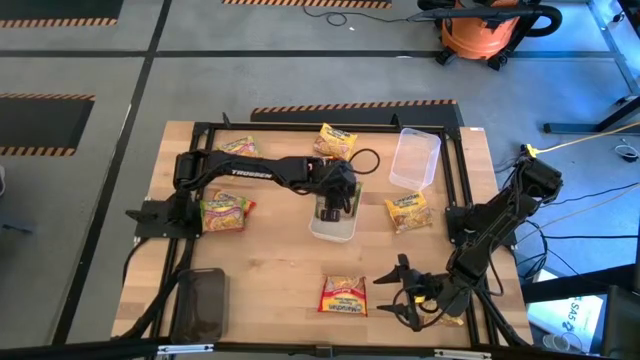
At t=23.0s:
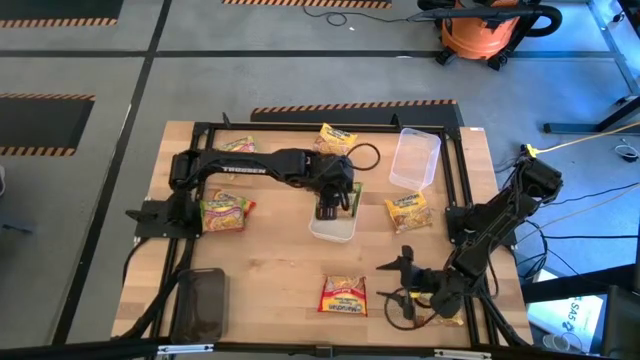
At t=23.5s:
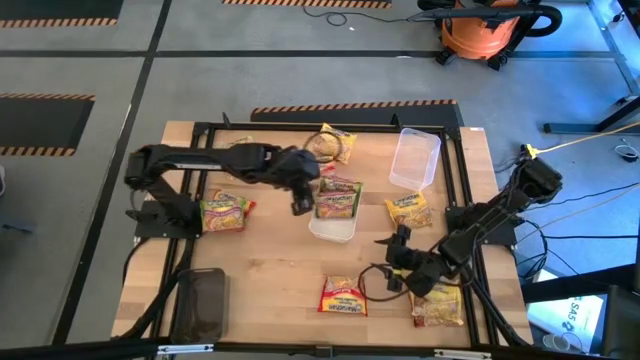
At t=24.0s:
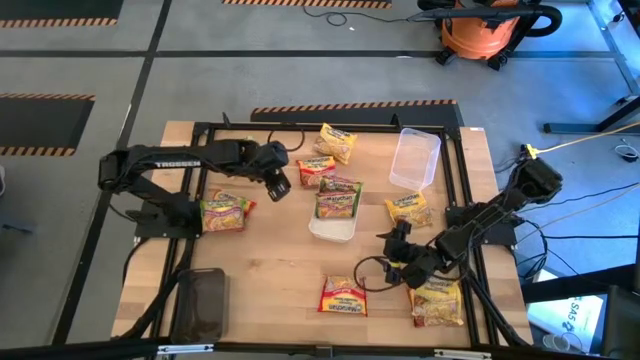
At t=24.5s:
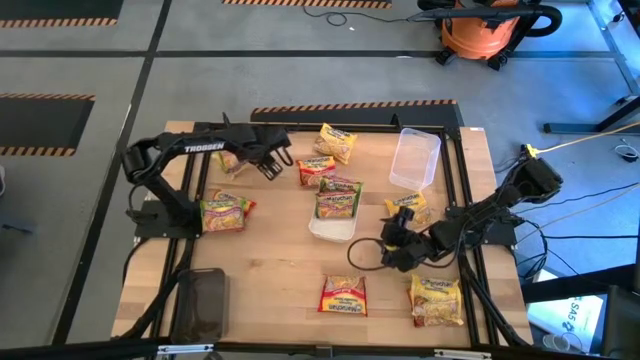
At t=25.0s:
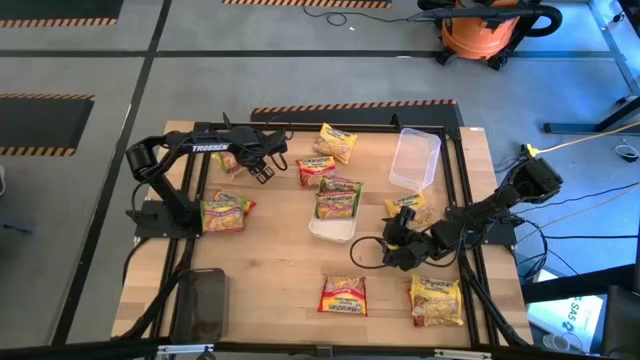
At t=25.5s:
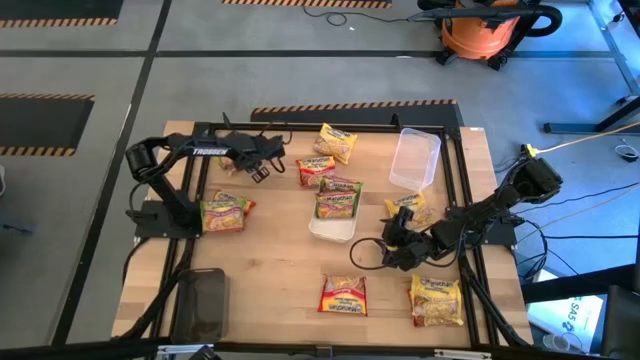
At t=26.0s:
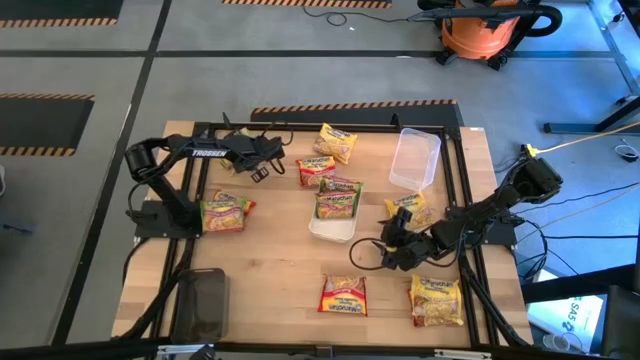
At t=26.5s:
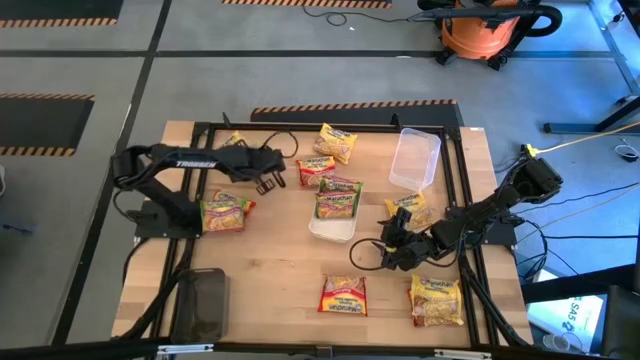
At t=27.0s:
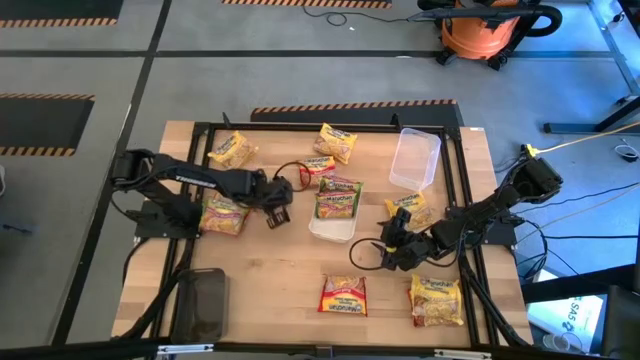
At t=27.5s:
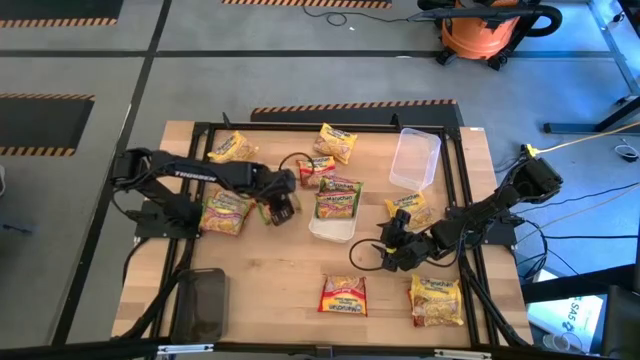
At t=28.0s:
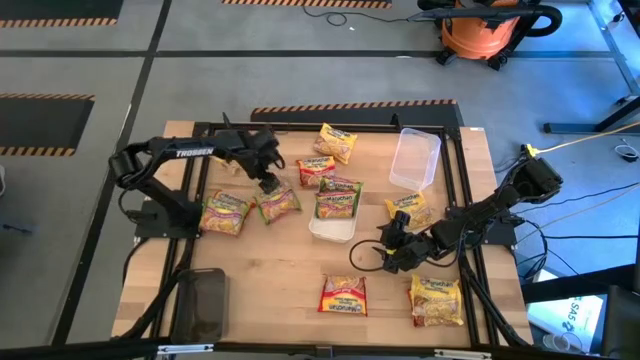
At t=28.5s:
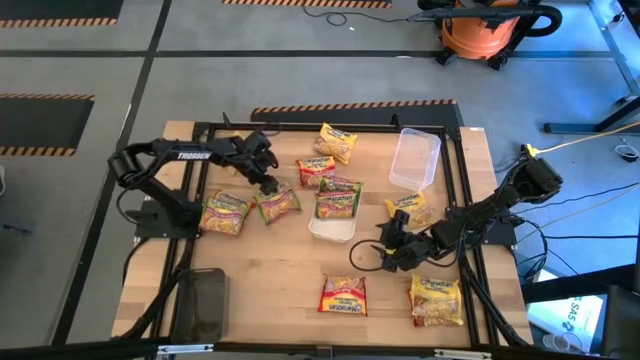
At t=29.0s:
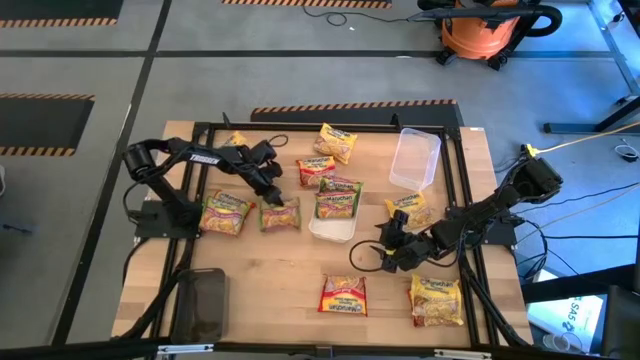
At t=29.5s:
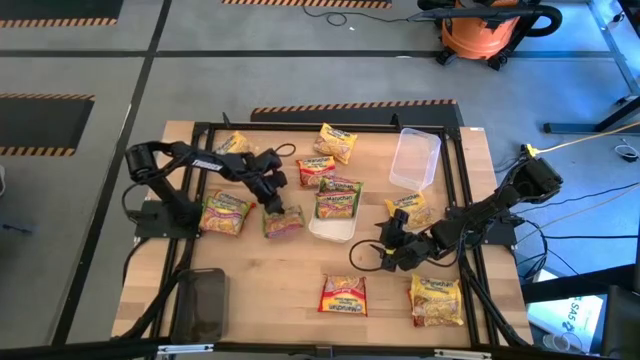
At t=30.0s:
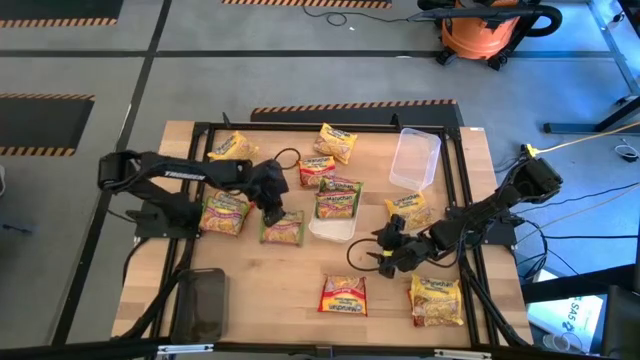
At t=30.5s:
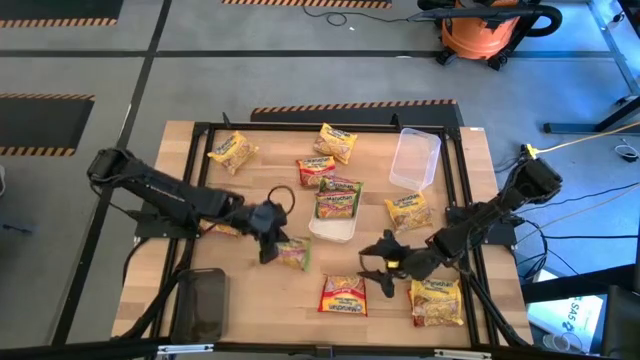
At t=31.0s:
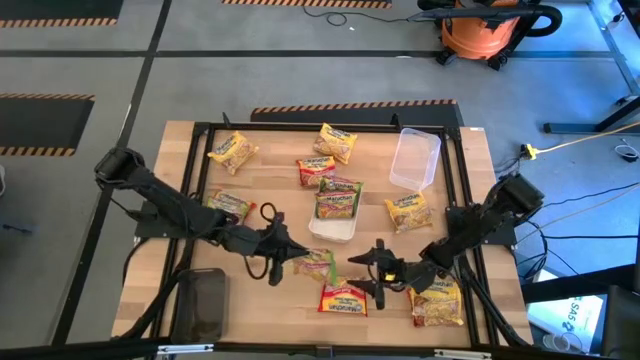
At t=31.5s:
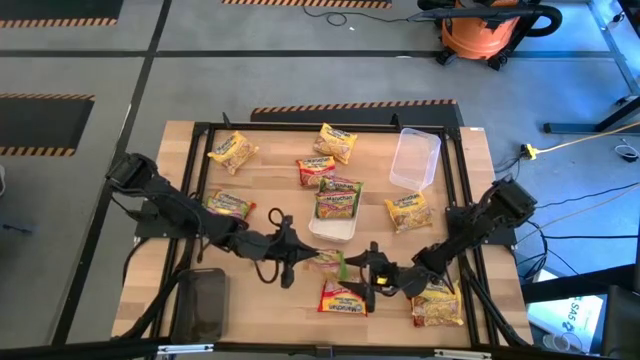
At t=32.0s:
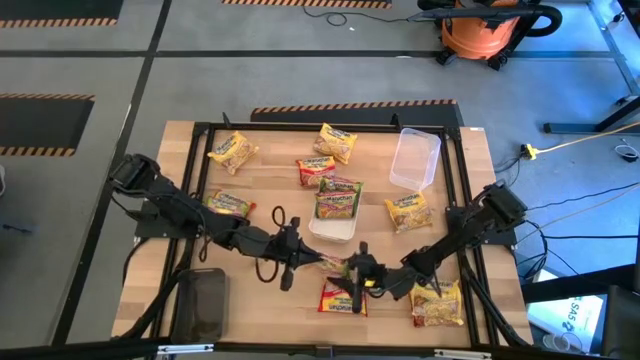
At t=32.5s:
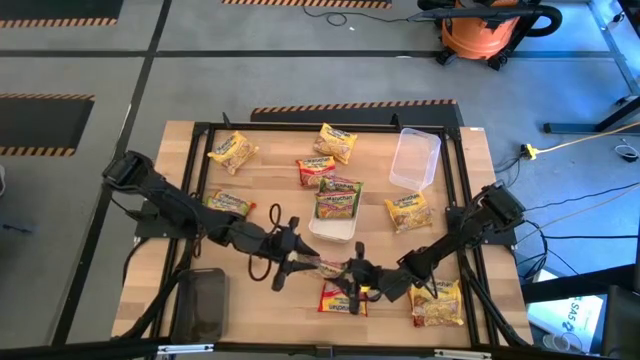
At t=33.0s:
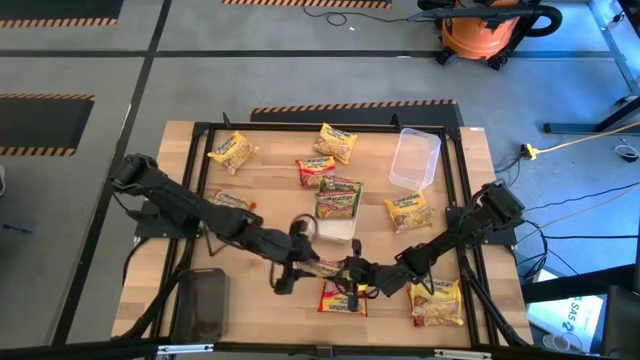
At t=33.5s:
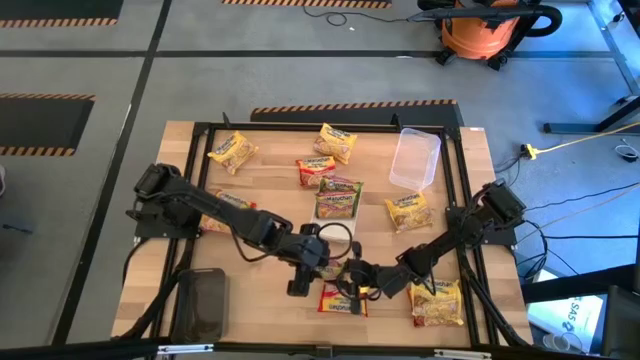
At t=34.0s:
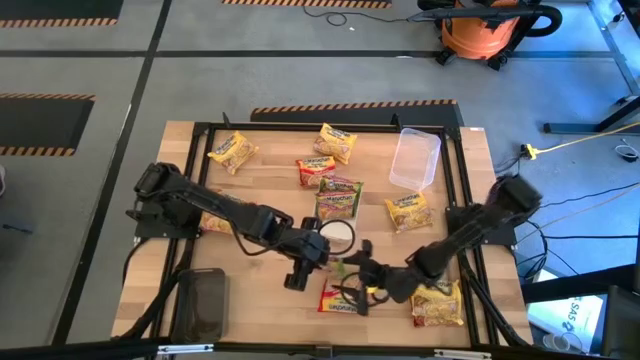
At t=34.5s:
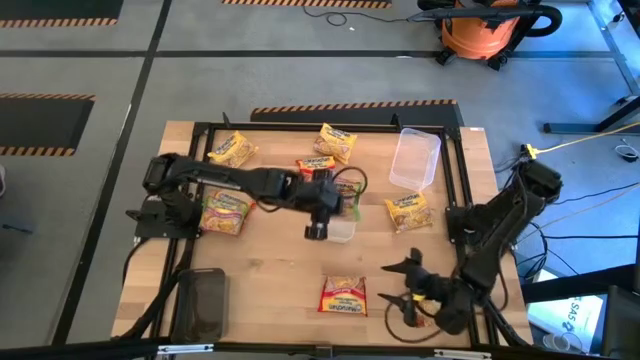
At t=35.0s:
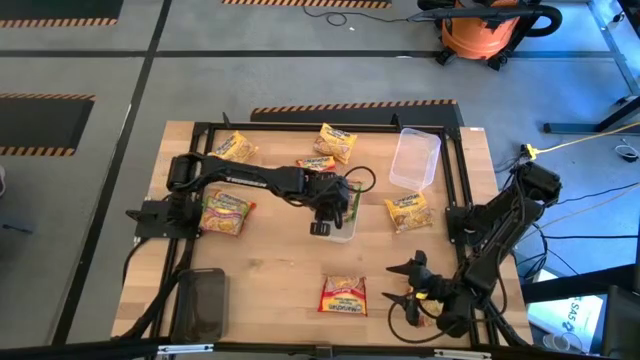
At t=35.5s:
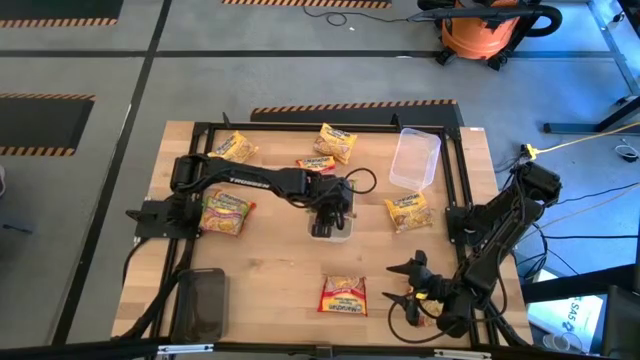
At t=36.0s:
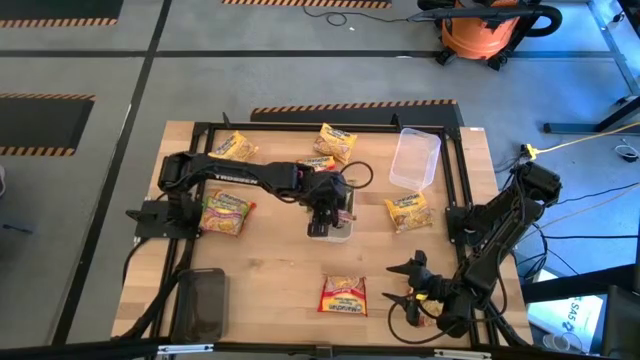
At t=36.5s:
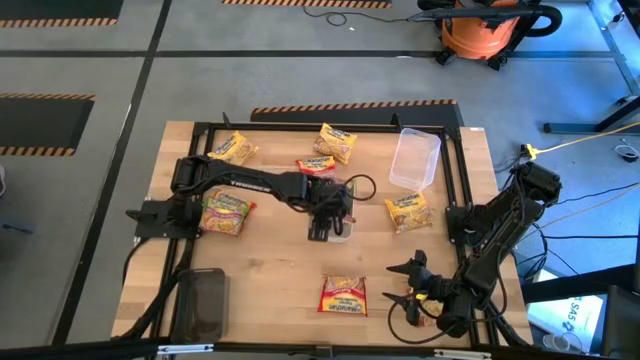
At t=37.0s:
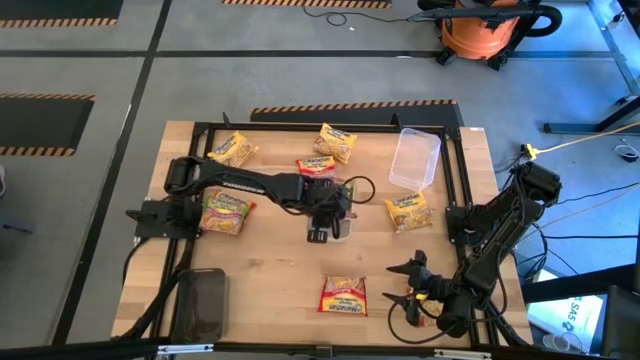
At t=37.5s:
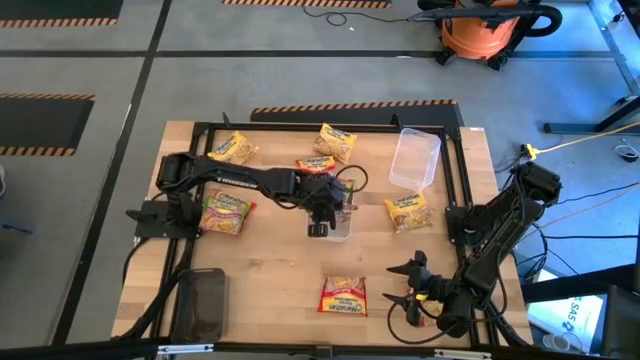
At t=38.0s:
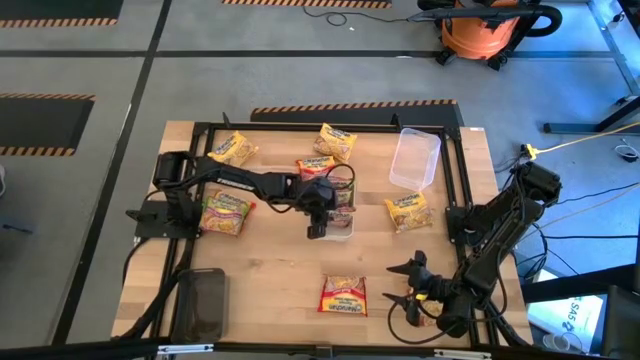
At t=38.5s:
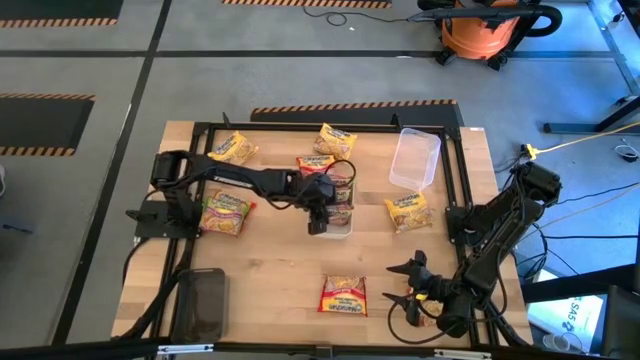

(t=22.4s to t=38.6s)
Task: Sort Maruchan noodles
Put the green noodle pack into the white bin

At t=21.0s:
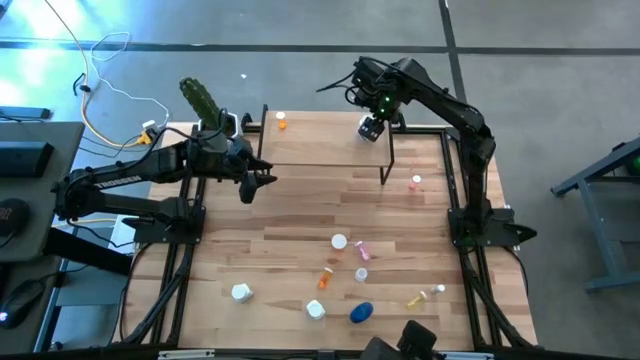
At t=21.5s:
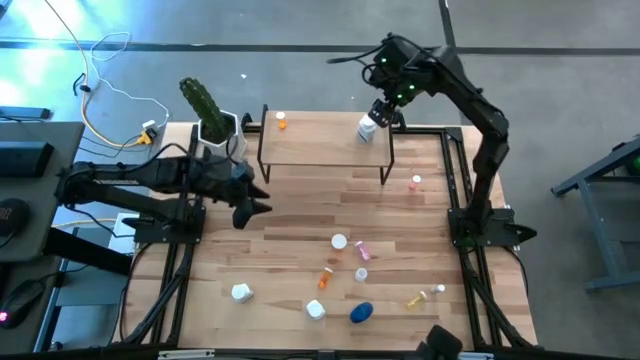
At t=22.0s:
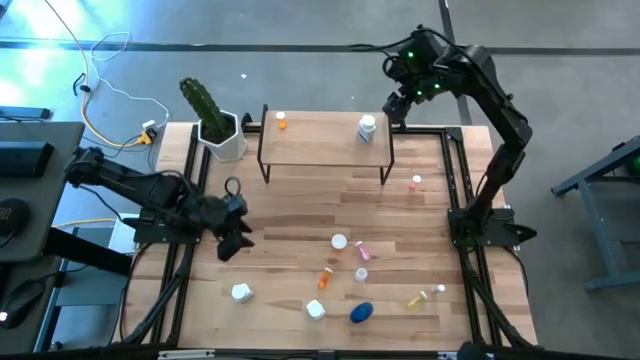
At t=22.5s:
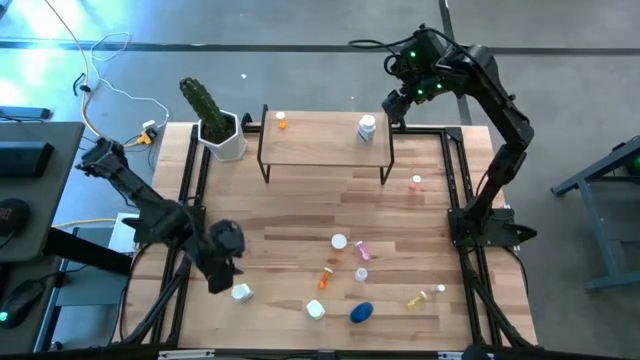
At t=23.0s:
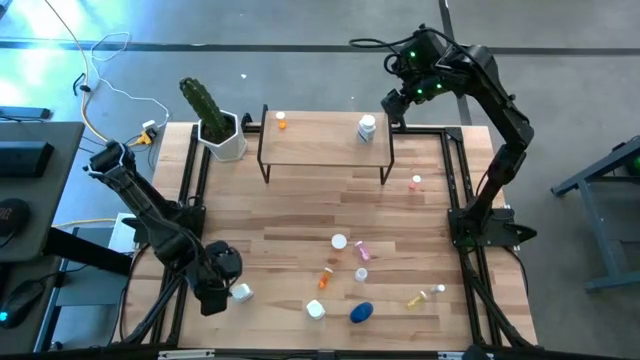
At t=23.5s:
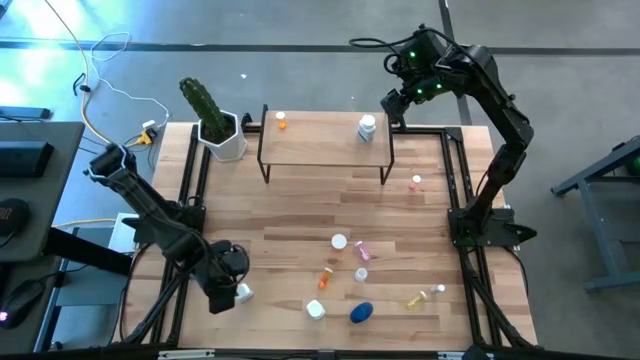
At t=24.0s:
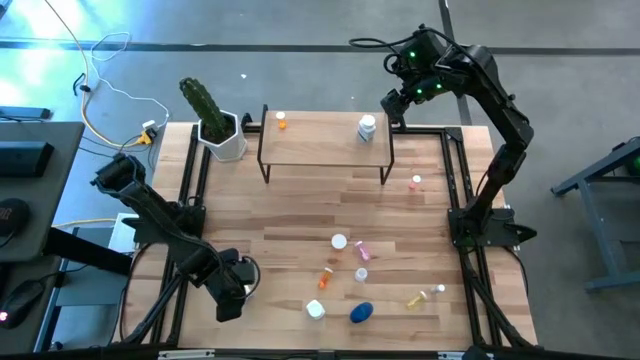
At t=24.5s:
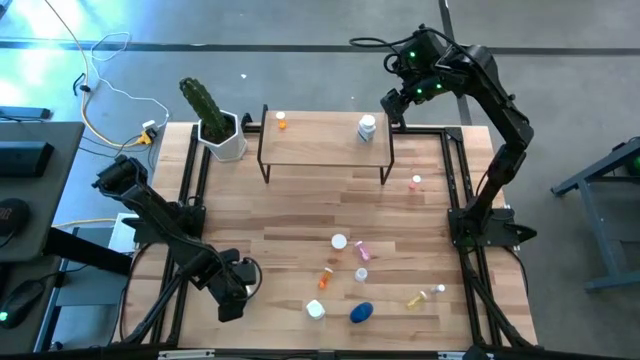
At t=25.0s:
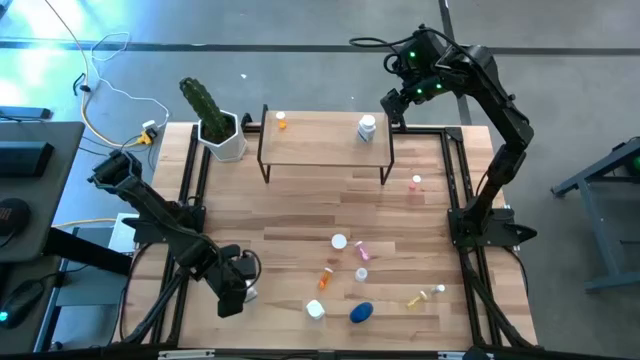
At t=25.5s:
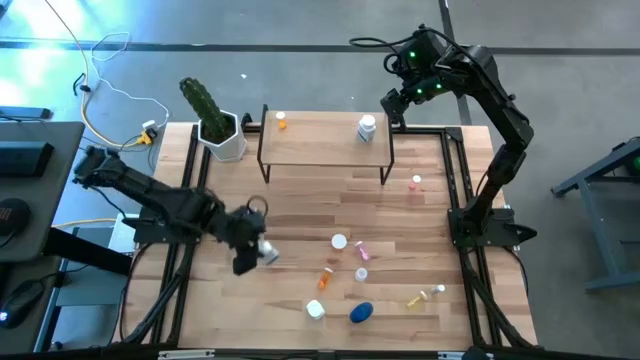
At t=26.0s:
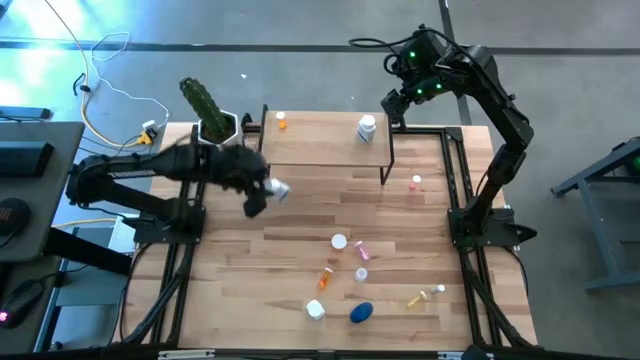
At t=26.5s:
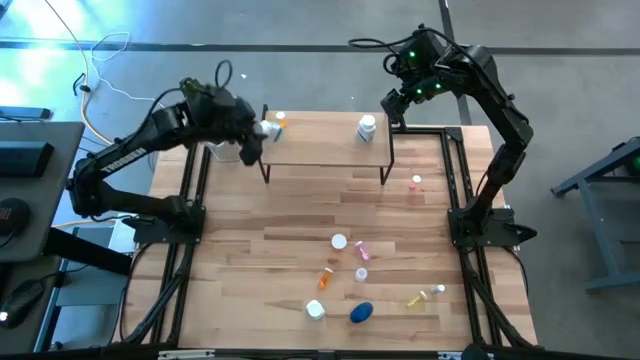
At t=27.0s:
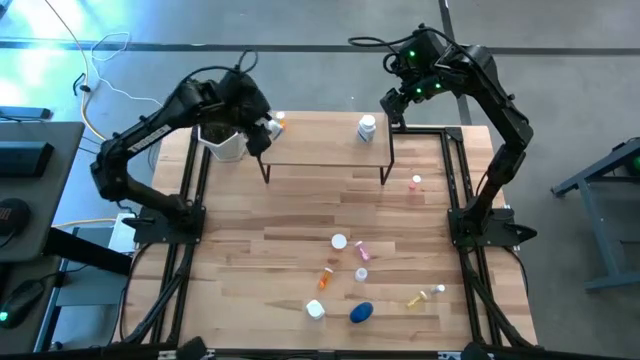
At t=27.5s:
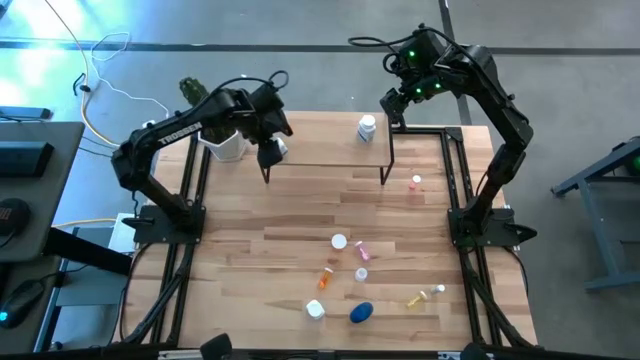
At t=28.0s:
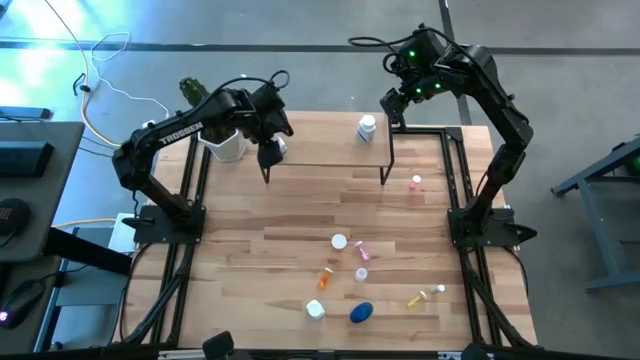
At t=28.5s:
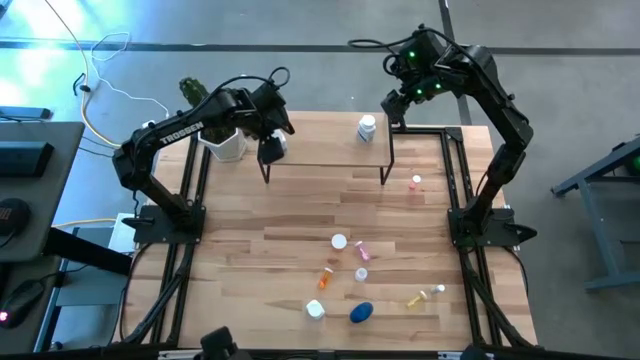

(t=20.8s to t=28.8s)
Task: Pick and place medicine bottles onto shelf by color
Put the left white blue pill bottle on the shelf
